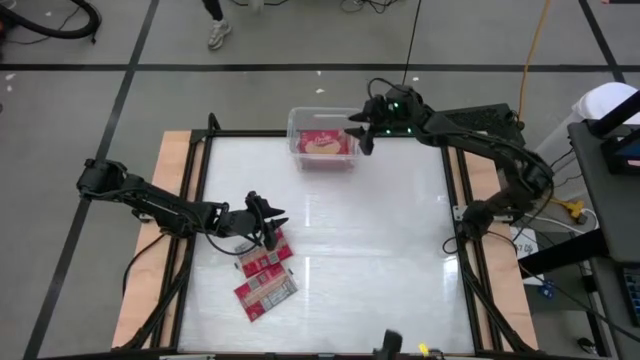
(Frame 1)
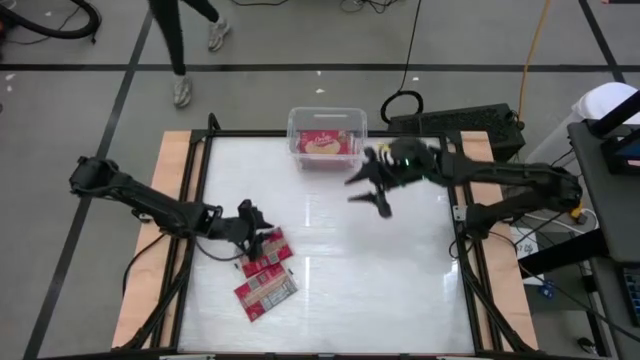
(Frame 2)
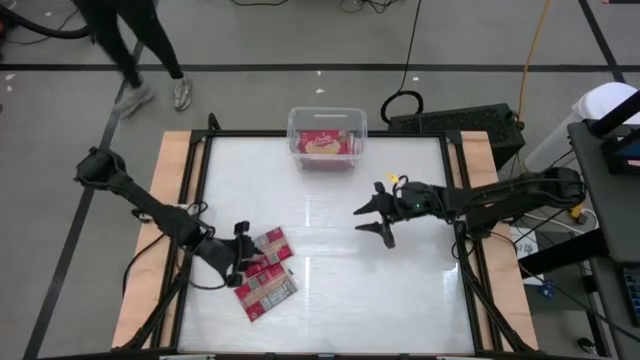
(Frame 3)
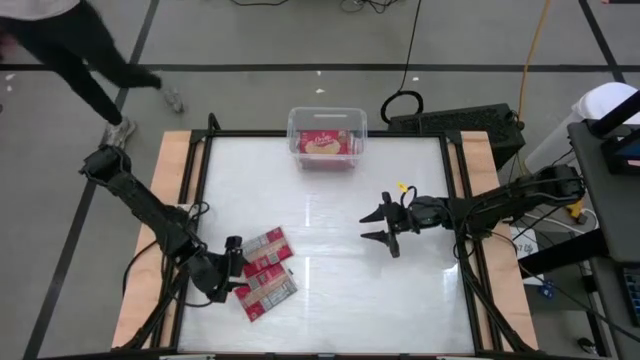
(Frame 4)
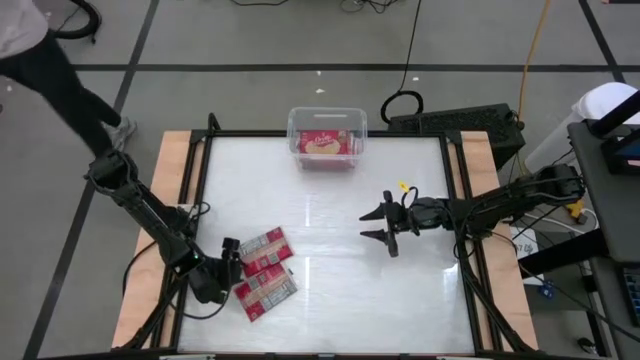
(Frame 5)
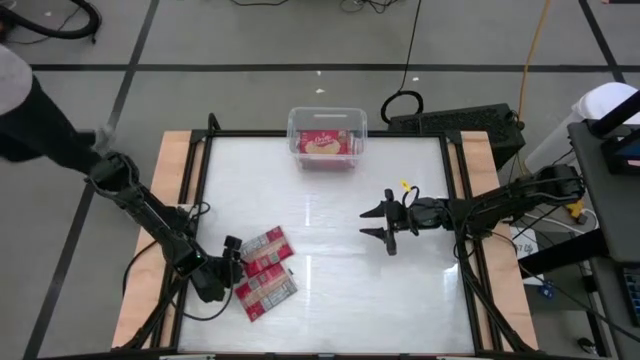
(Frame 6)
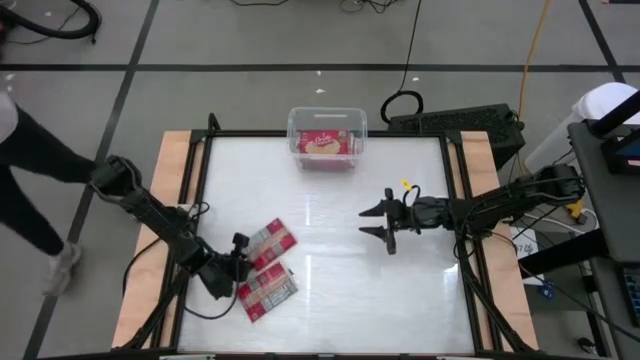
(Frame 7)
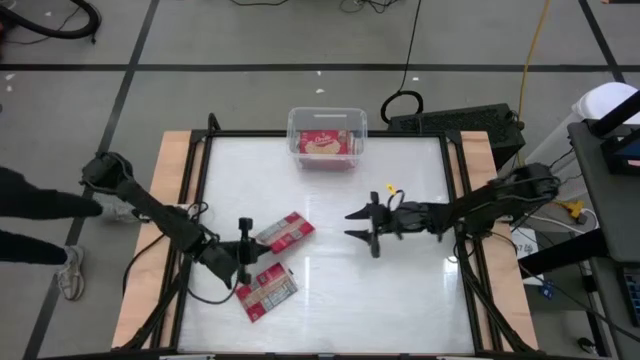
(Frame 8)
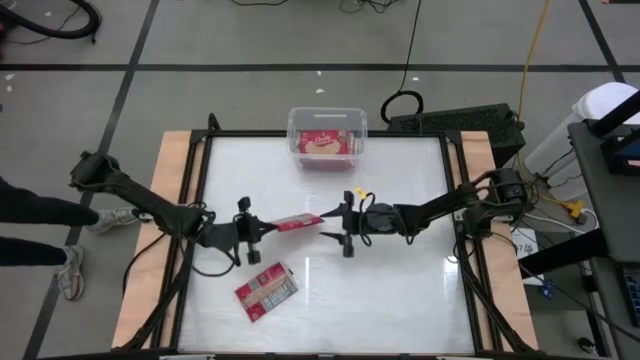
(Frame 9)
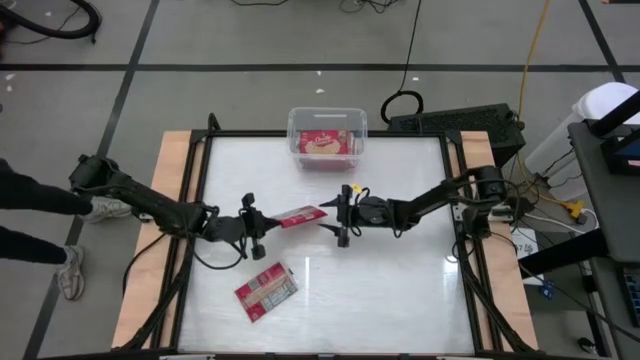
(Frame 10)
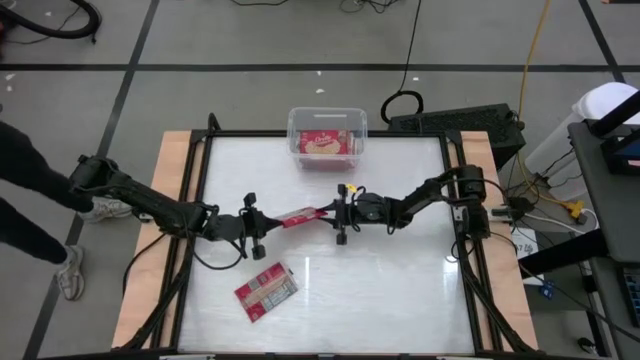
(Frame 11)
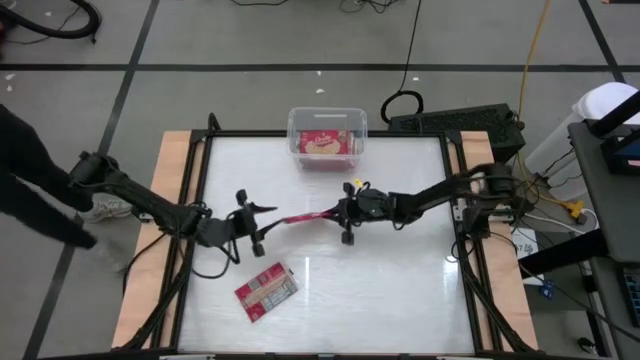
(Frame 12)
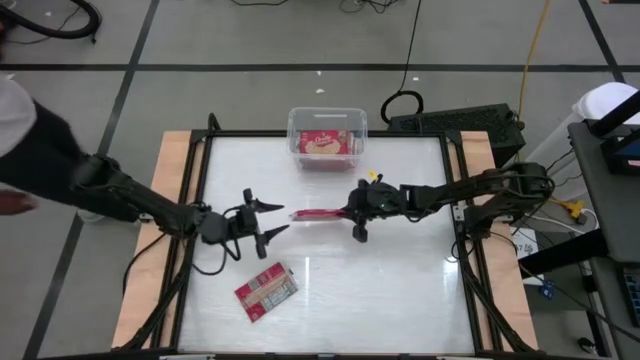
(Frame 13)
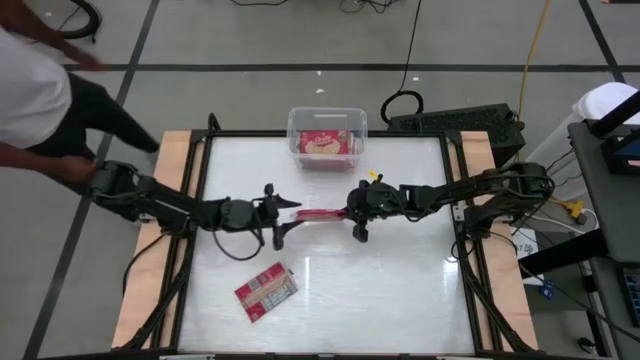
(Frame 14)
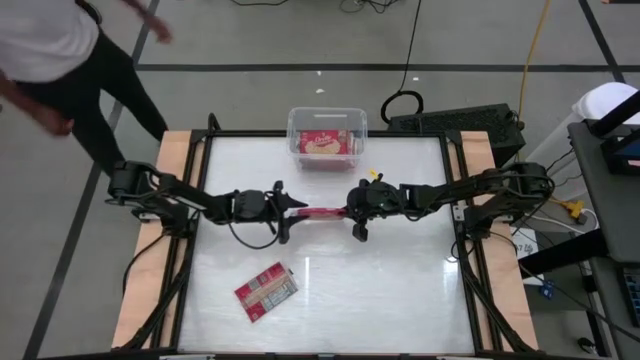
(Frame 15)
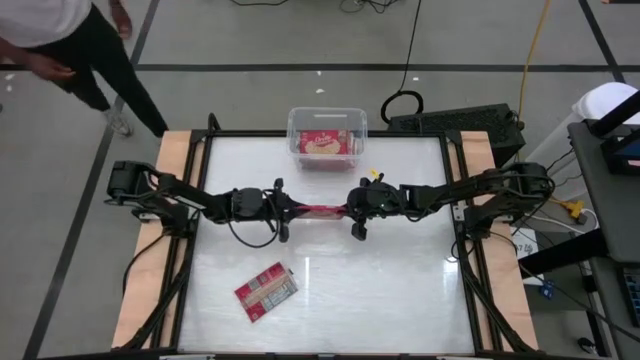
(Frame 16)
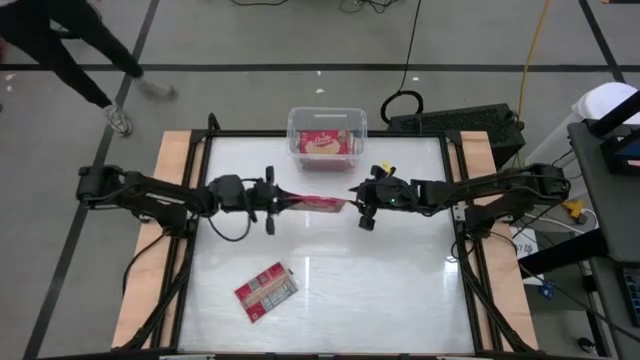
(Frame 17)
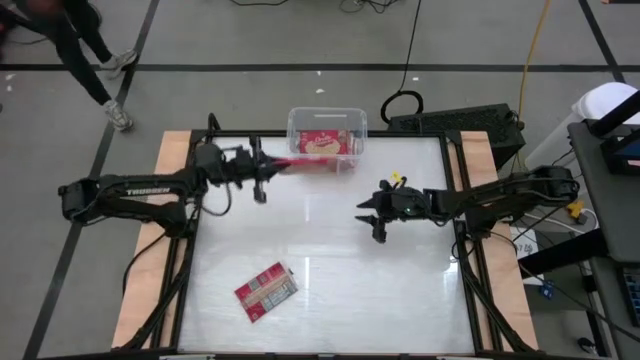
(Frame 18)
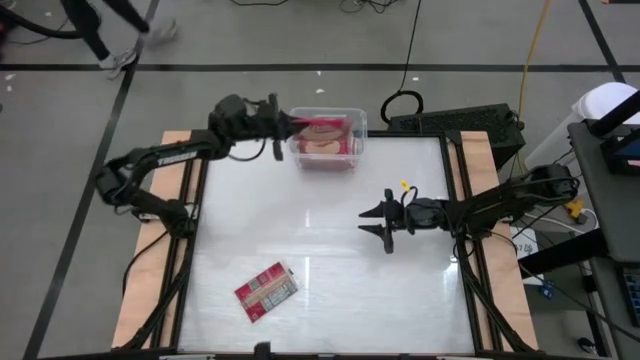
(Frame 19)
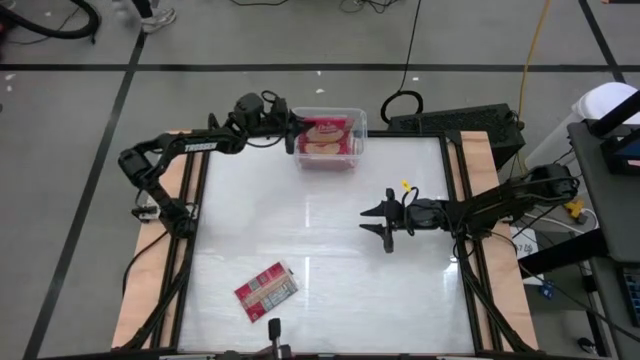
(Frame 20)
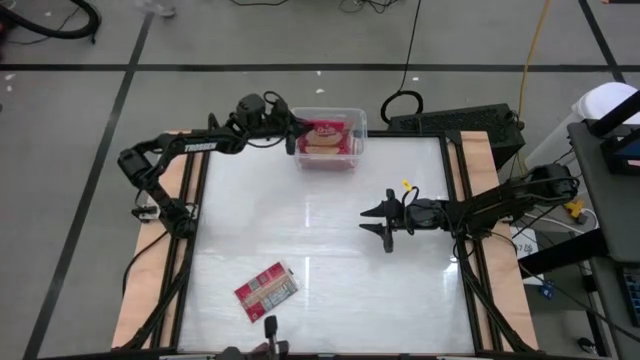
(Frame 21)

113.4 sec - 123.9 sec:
Task: Sort popcorn bags into baskets
Put the popcorn bag into the transparent bin

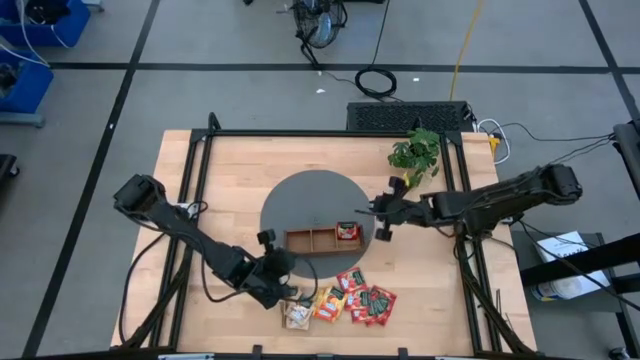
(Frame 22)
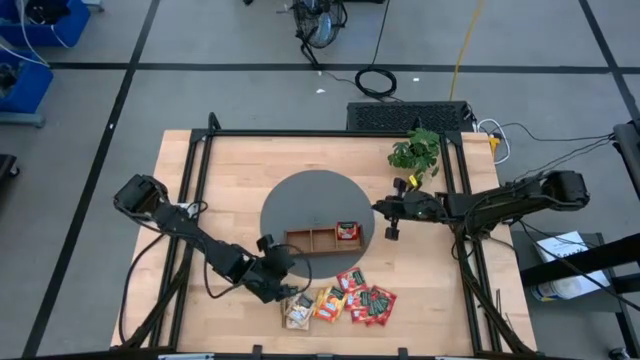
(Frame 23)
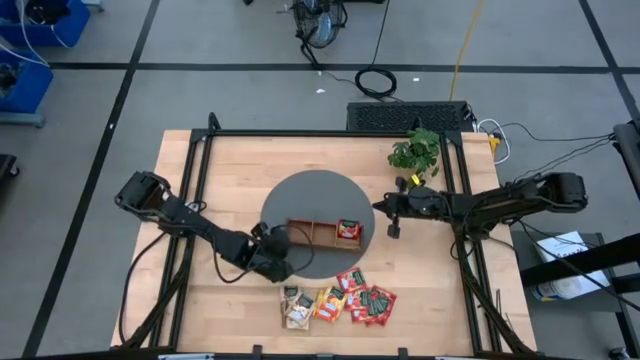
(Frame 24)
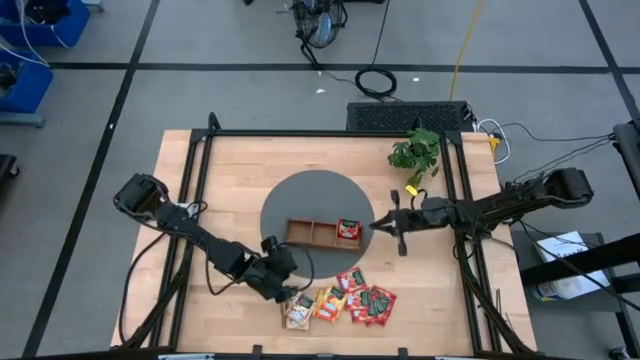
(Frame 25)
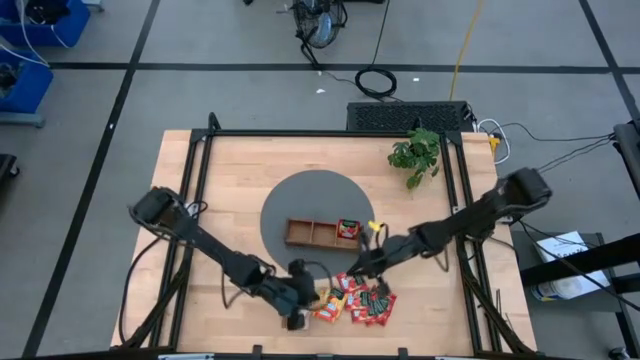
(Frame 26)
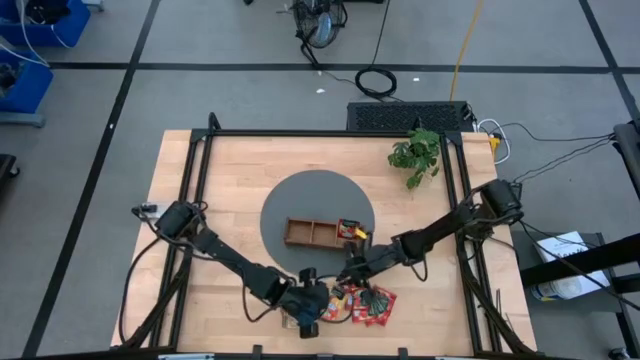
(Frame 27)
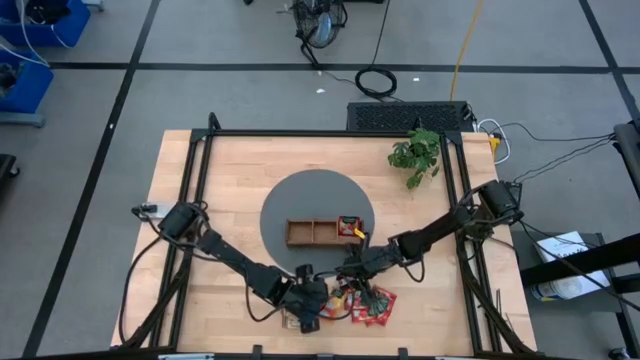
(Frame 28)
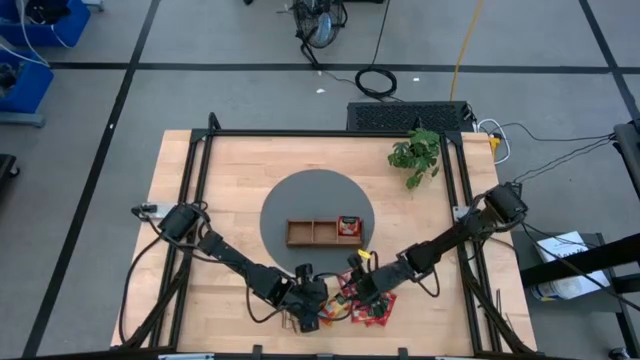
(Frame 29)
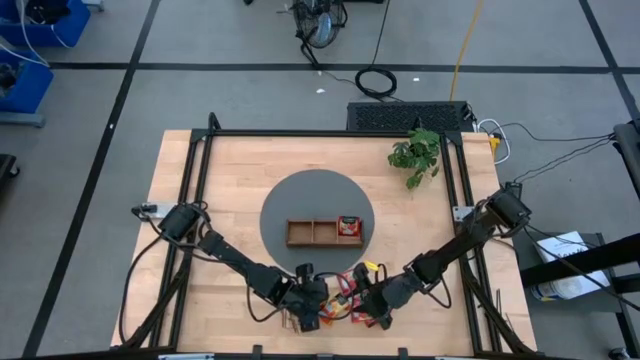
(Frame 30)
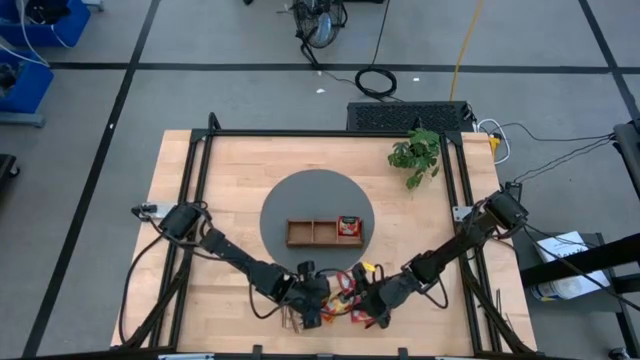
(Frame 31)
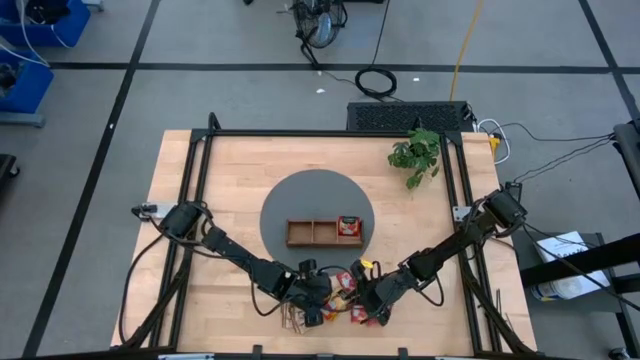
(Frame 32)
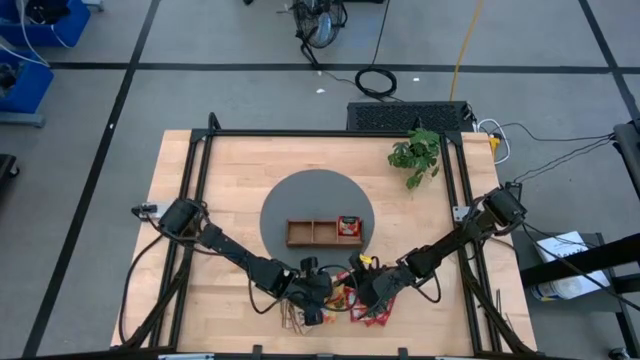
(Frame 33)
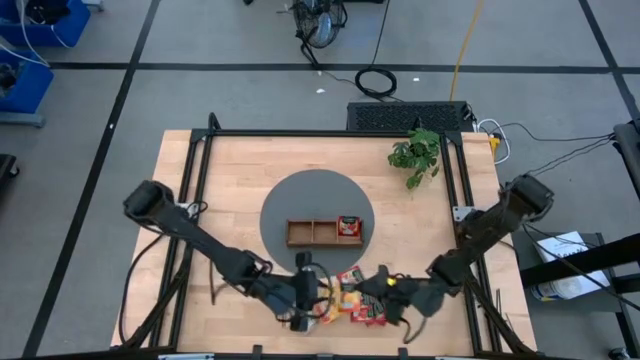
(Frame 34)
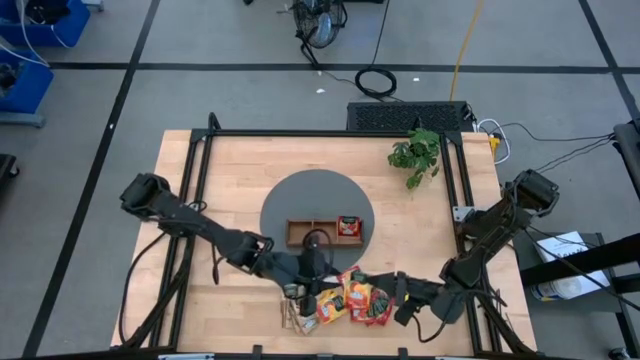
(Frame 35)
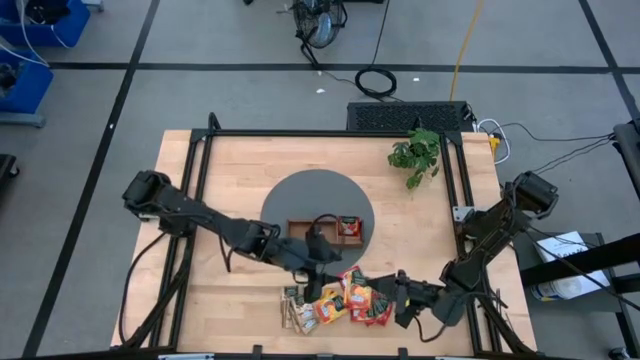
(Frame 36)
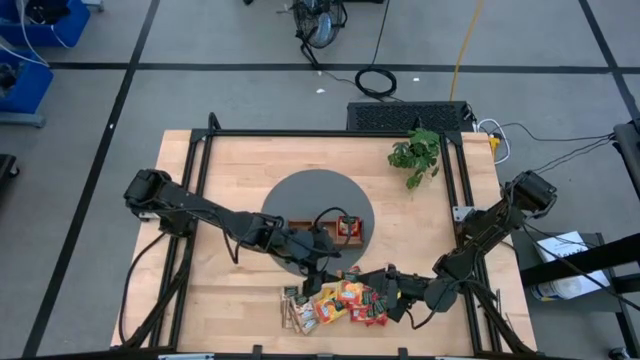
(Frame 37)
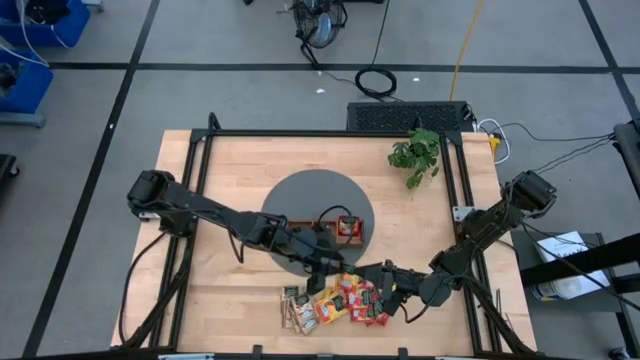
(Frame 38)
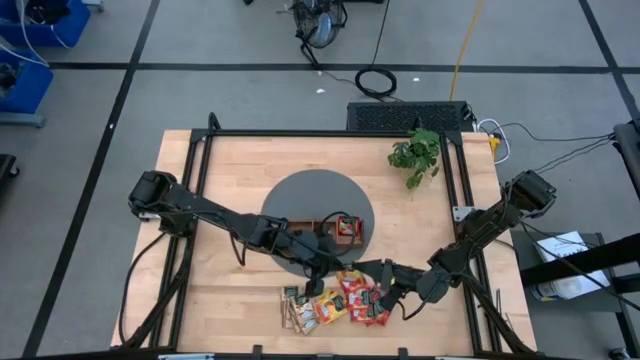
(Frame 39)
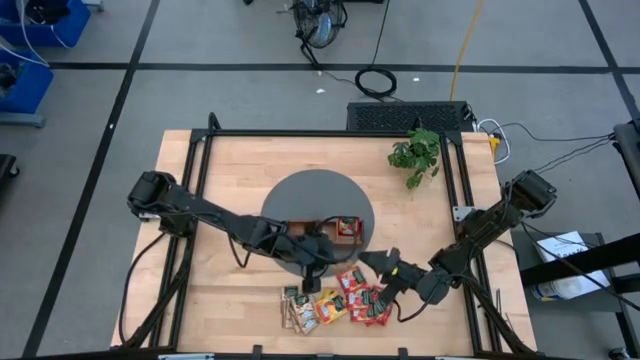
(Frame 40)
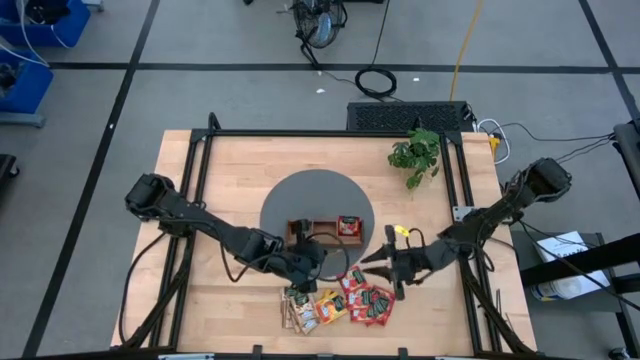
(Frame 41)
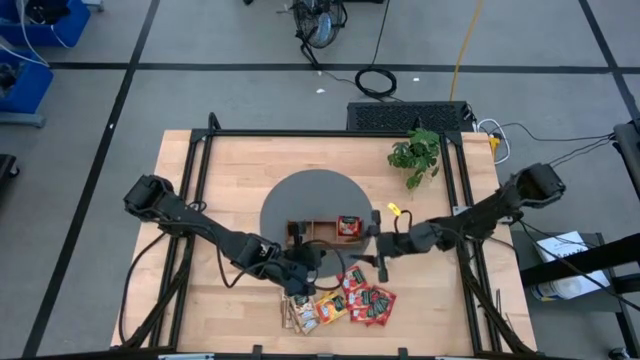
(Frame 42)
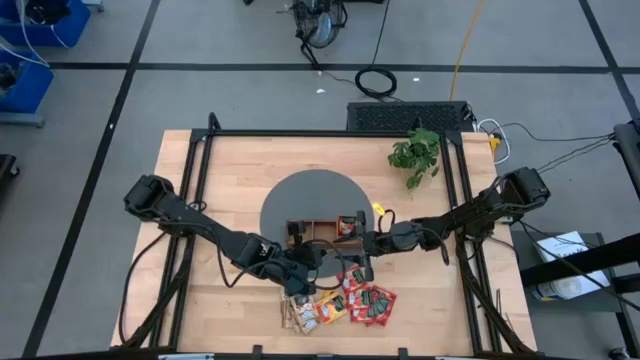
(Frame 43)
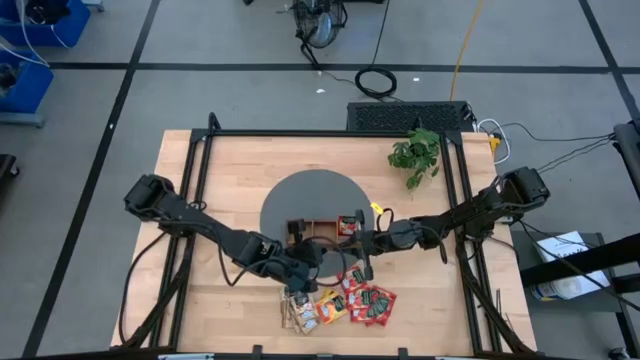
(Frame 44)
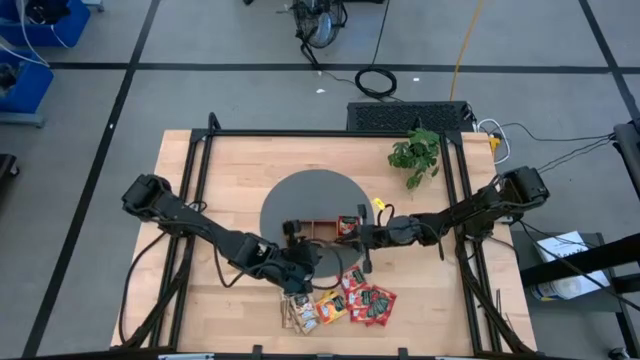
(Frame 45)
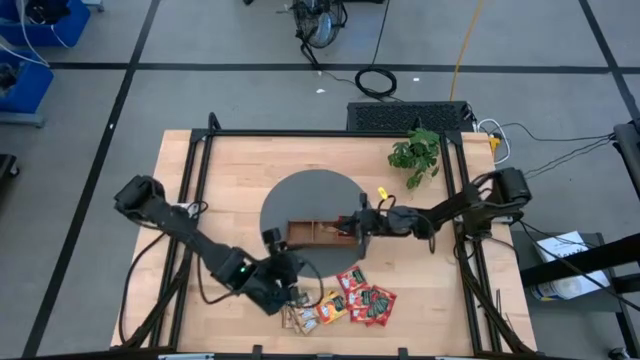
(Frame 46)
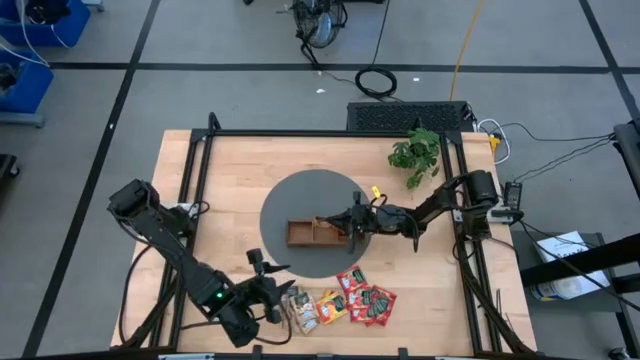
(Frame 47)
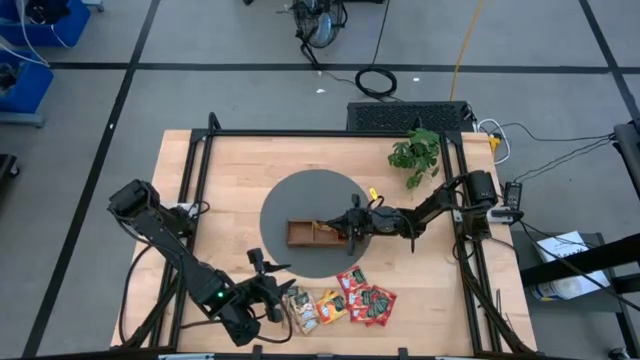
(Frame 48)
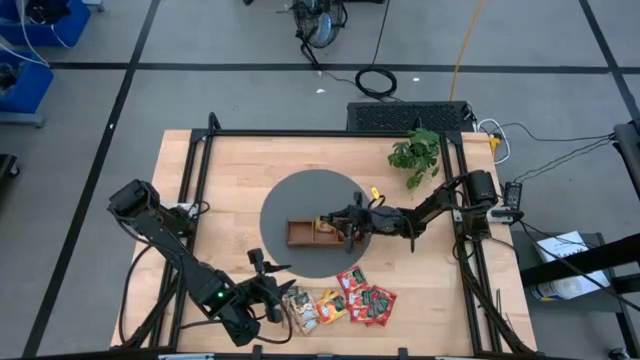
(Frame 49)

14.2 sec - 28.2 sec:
Task: Pick & Place Tea
Put the mango tea sachet into the middle compartment of the wooden organizer
